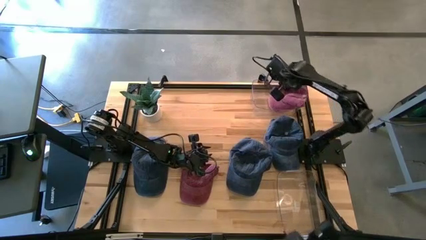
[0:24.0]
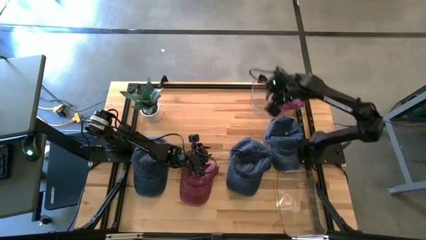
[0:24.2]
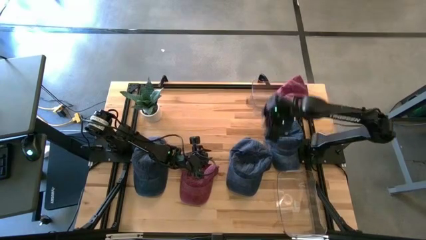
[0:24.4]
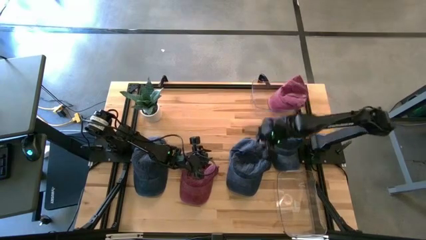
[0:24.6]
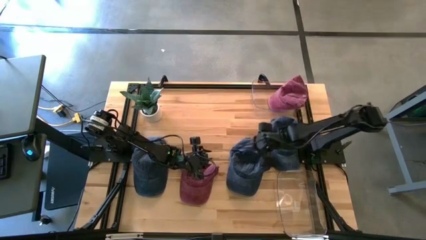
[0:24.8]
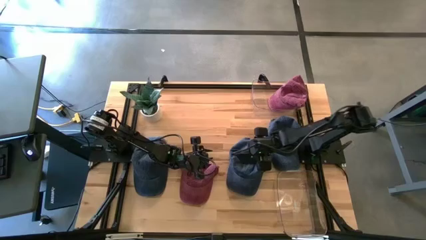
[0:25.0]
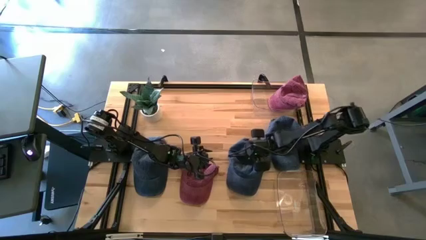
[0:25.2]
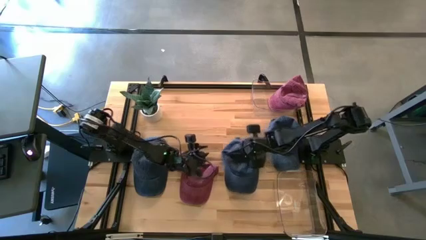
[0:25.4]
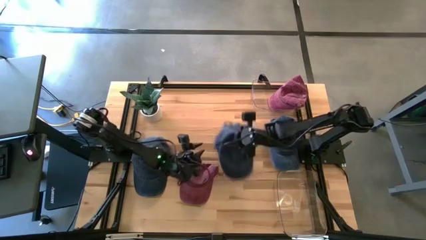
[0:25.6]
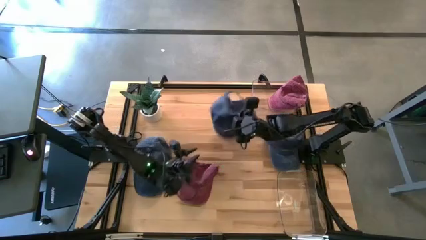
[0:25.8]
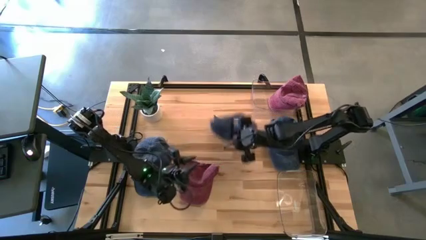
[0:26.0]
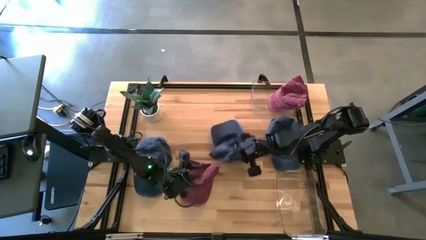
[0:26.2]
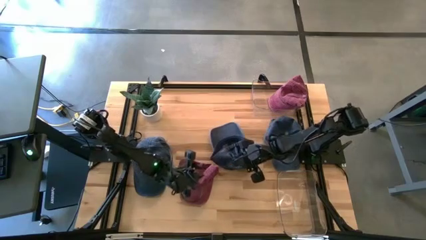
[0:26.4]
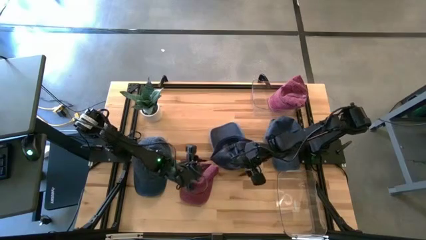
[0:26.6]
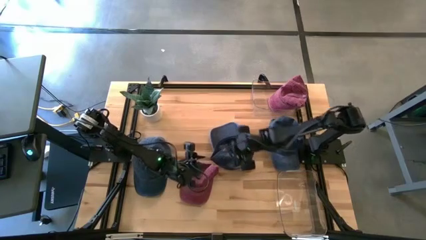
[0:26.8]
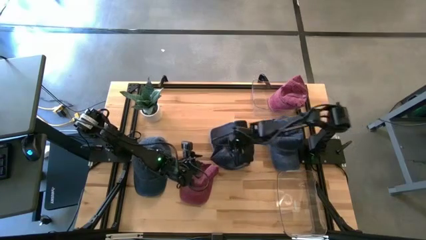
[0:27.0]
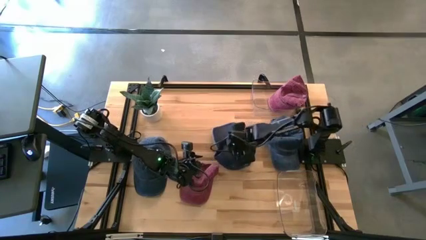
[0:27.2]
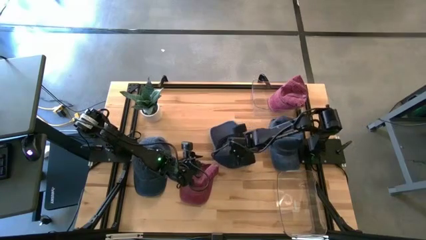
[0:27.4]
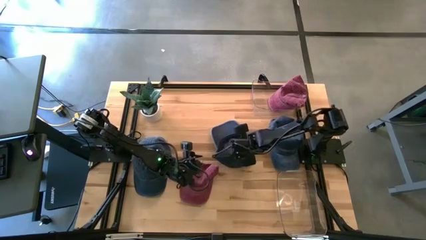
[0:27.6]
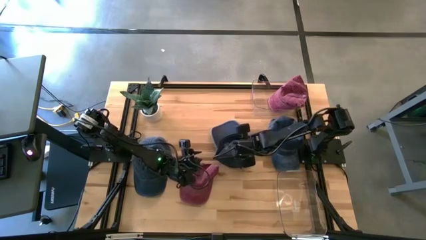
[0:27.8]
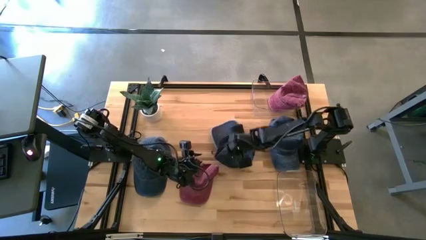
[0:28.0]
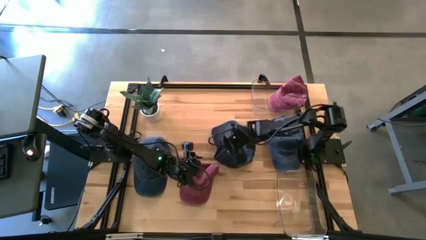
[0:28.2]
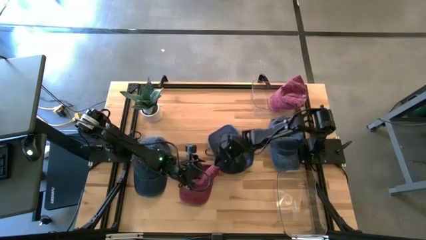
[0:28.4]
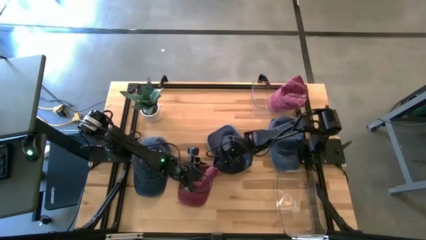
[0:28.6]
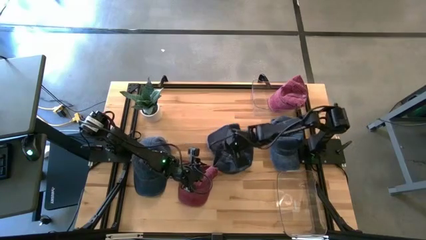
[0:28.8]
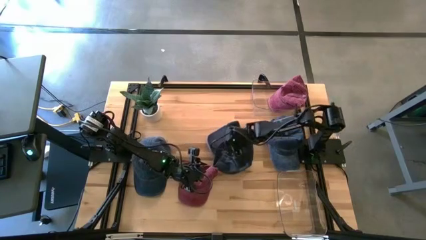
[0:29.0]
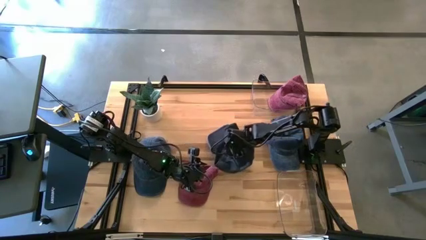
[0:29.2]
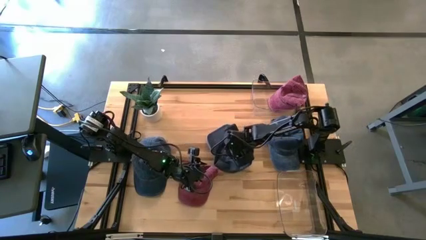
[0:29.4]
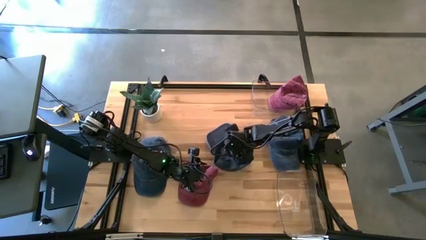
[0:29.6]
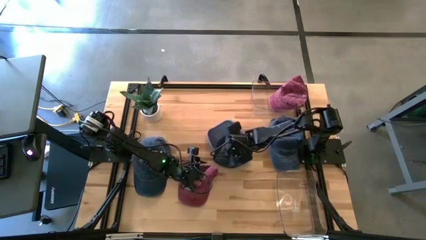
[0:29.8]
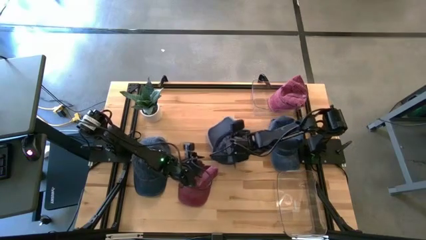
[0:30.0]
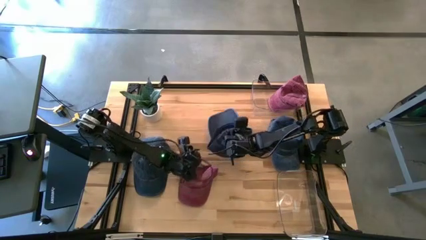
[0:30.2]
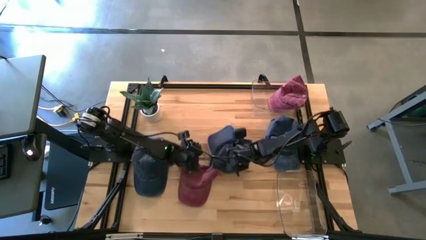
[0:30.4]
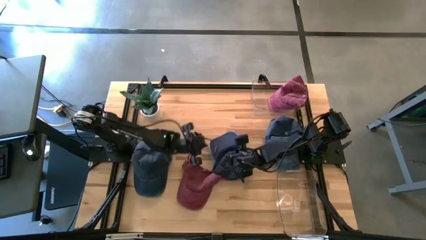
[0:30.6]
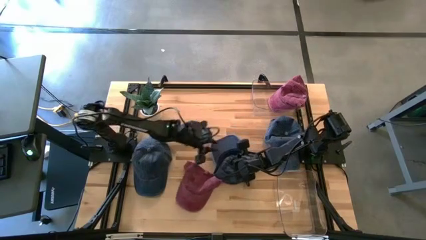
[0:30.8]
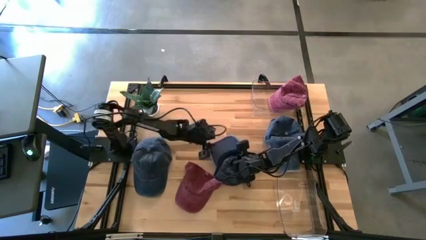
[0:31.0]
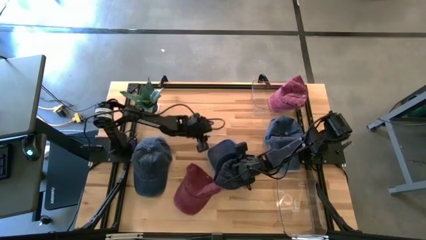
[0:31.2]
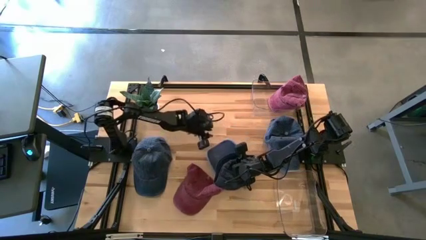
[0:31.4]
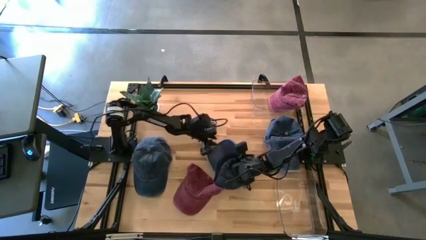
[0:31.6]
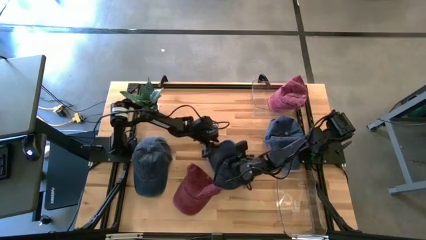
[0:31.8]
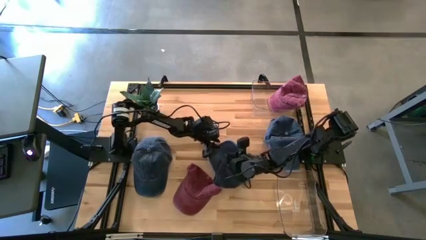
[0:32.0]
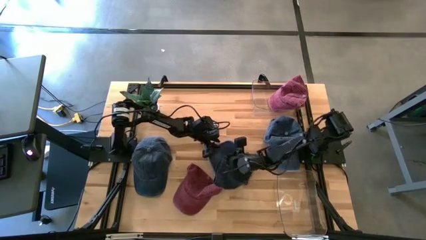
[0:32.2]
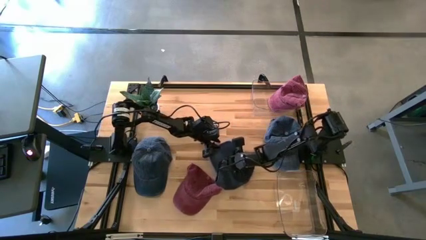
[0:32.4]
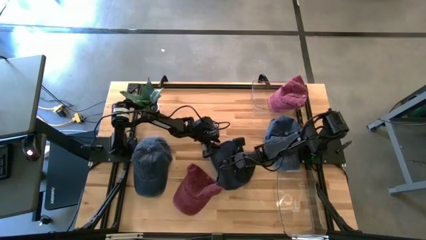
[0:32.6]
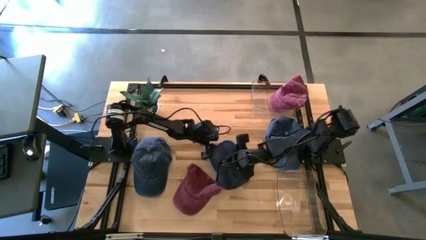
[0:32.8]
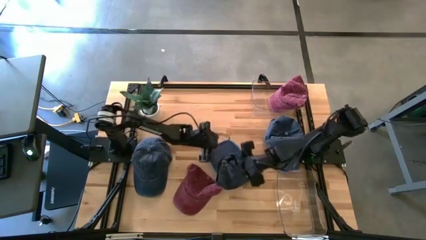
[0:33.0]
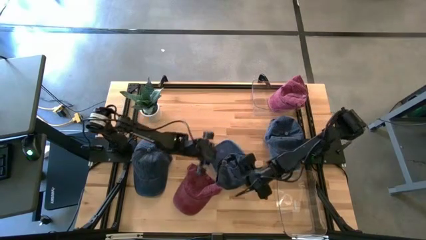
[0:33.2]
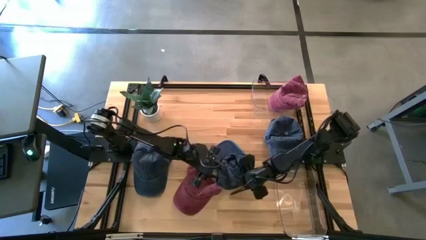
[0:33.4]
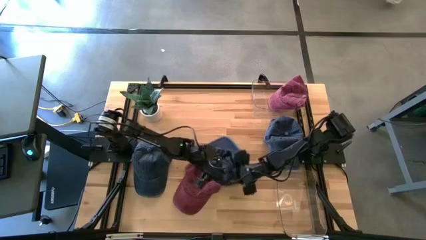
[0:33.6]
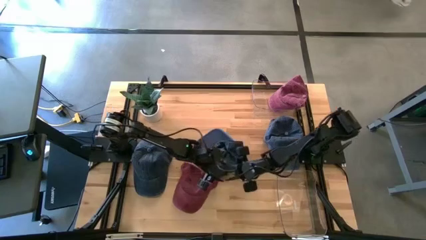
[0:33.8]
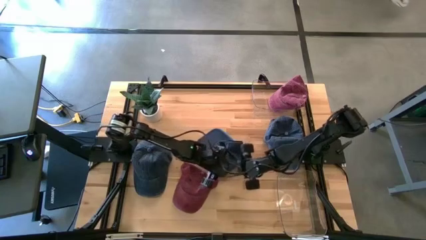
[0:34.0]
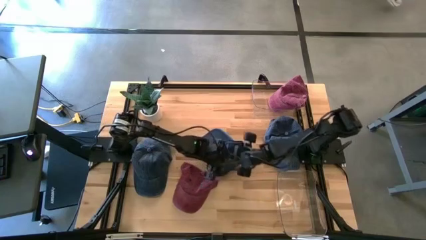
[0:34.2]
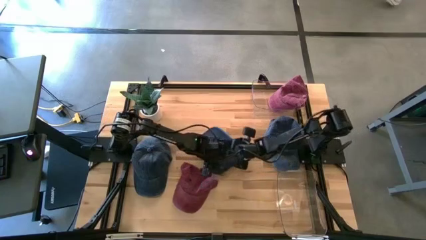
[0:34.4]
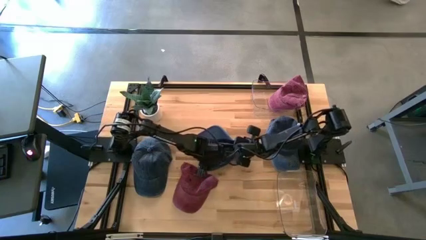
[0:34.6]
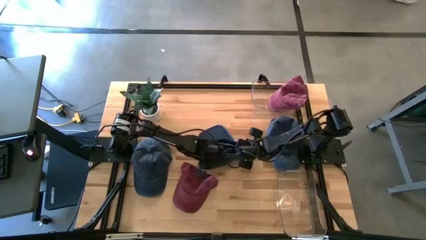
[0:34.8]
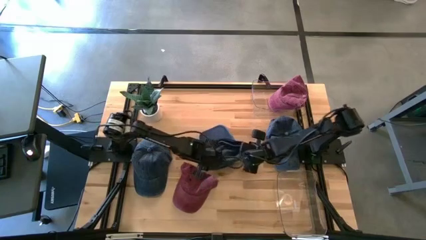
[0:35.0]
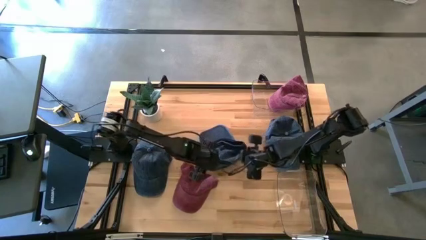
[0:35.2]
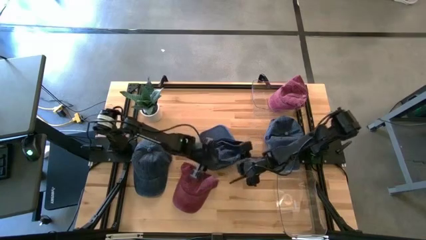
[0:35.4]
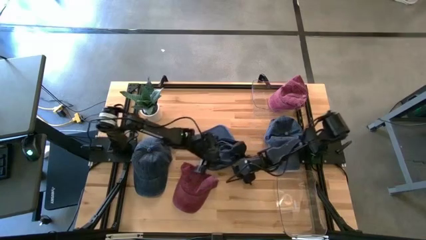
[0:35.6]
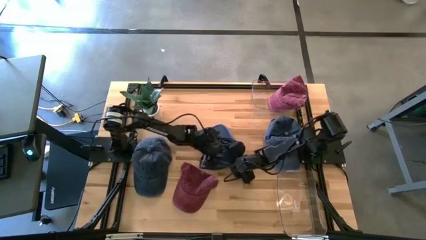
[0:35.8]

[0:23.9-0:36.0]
Task: Pick & Place hat
Put the middle blue cap into the bottom transparent bin
